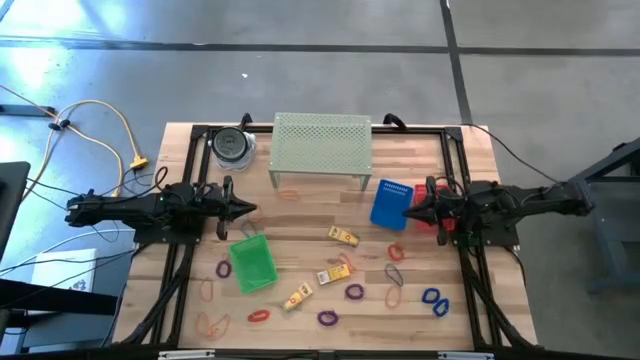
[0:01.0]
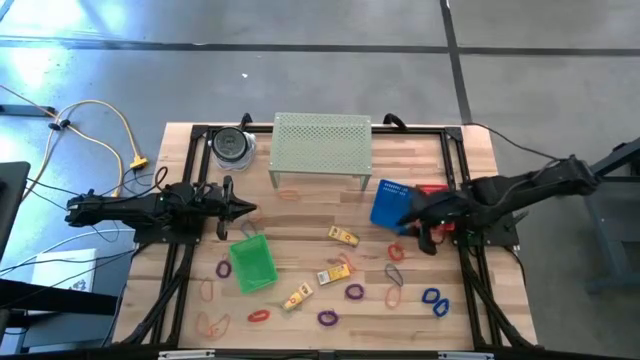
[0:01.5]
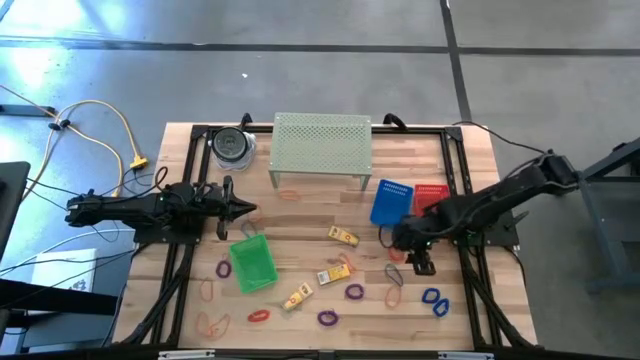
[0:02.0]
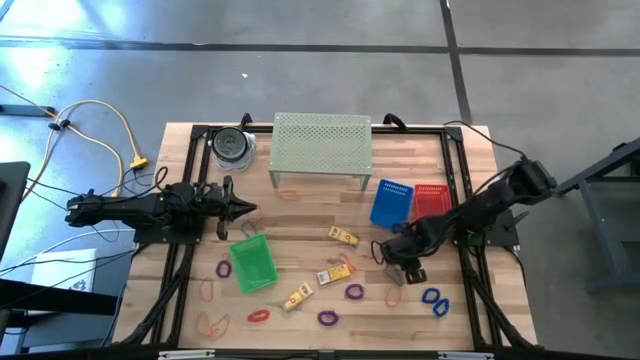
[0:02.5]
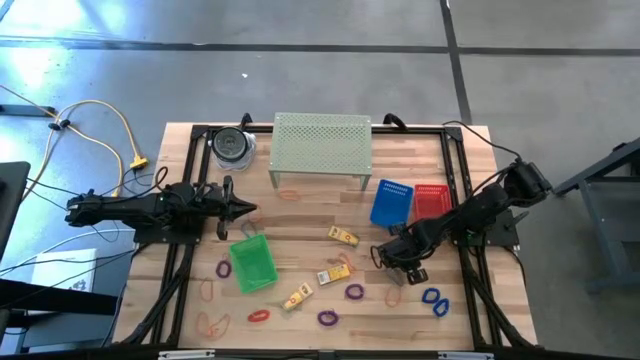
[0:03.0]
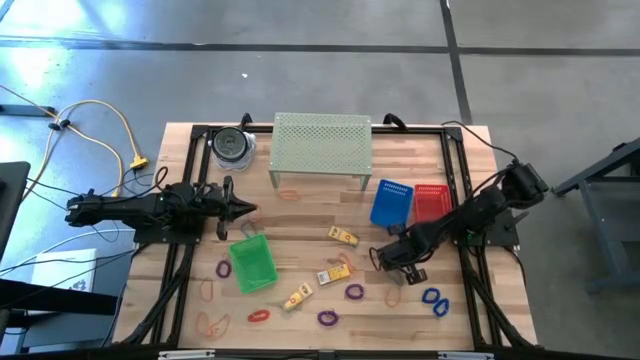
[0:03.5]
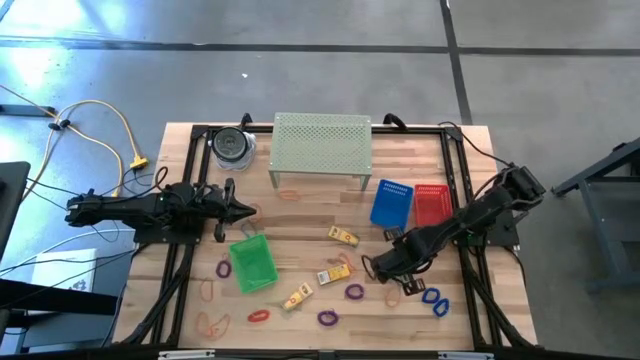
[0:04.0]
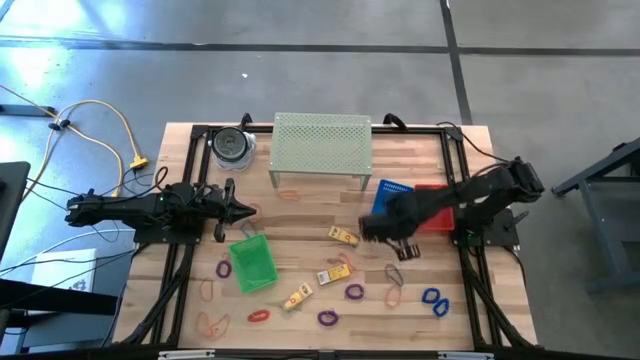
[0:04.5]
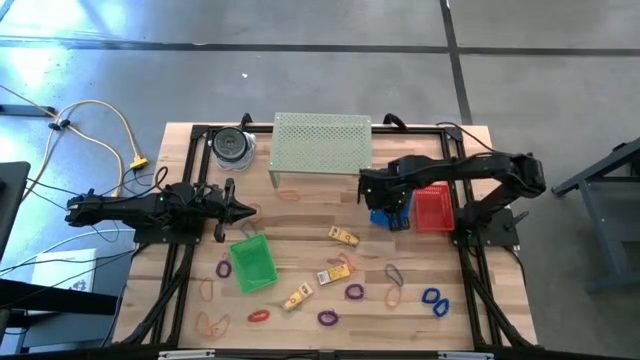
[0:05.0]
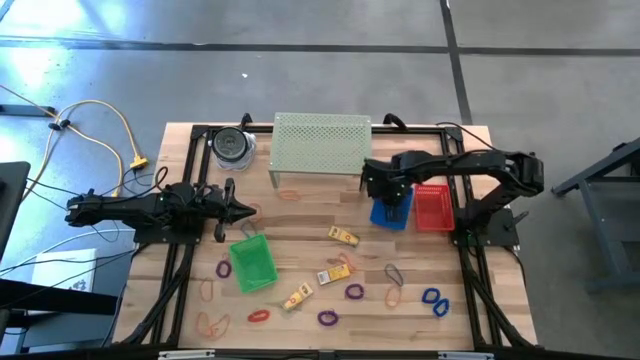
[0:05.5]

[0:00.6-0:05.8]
Task: Pick & Place Office Desk Supplies
Put the orange spring keychain into the blue bin

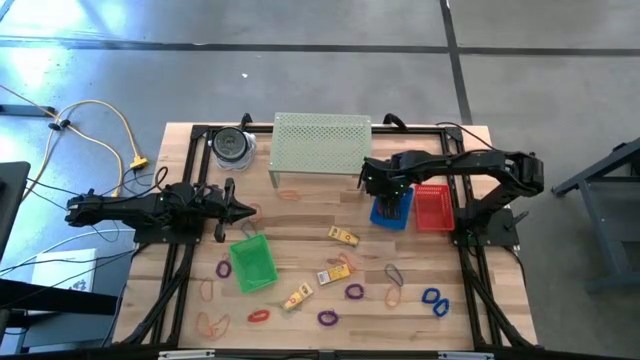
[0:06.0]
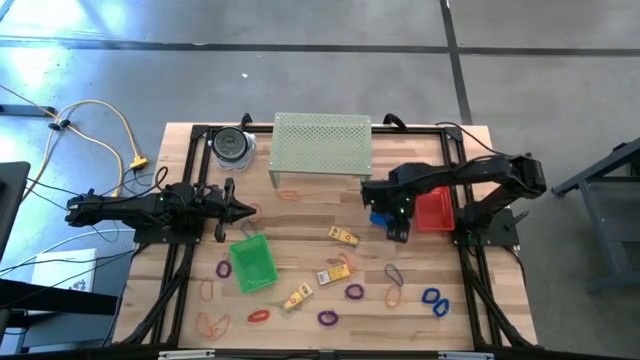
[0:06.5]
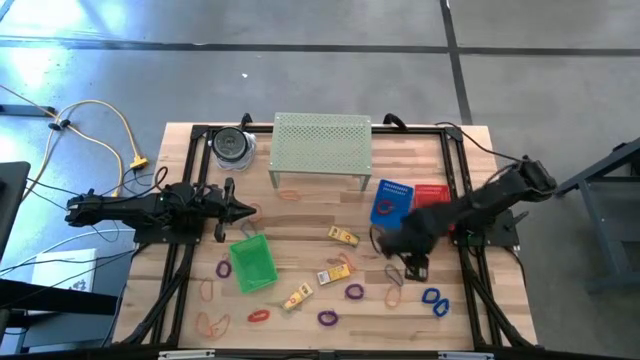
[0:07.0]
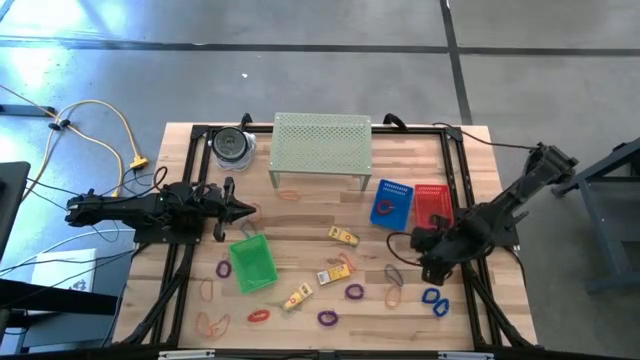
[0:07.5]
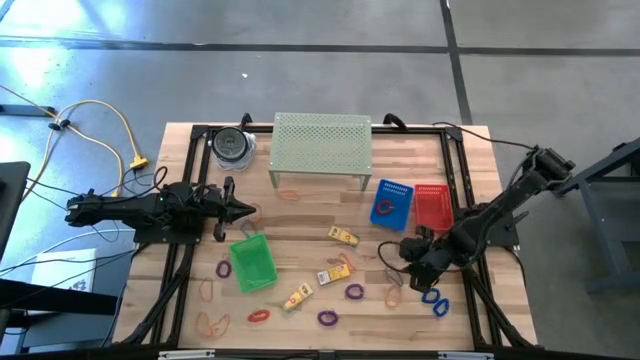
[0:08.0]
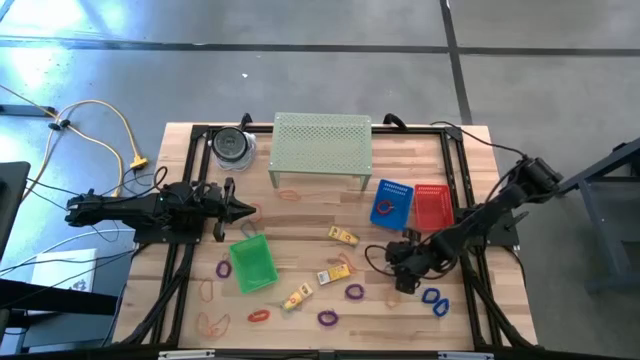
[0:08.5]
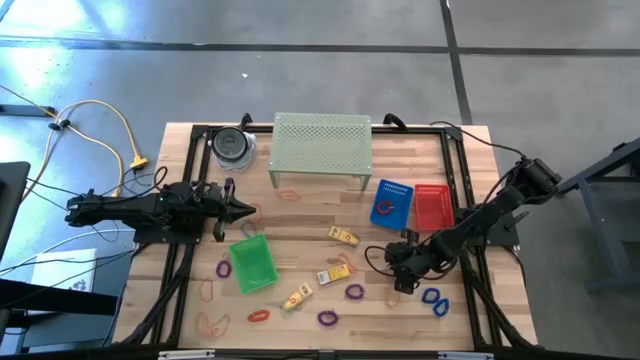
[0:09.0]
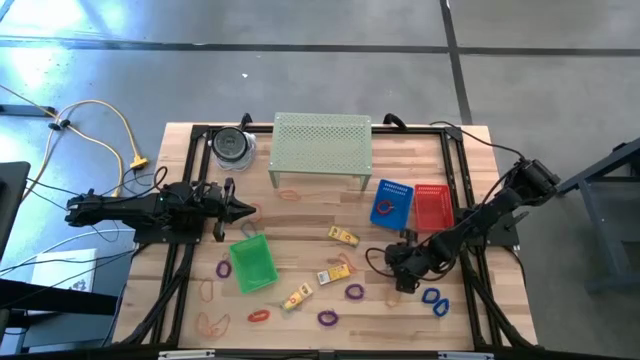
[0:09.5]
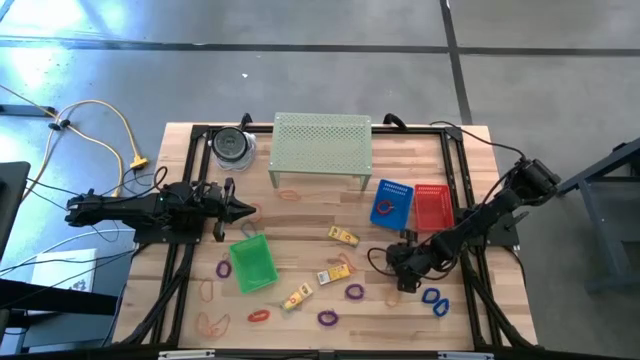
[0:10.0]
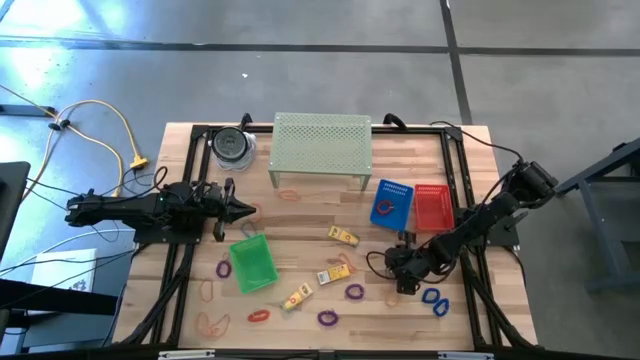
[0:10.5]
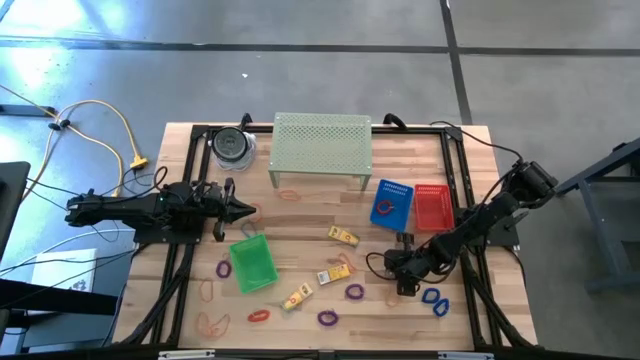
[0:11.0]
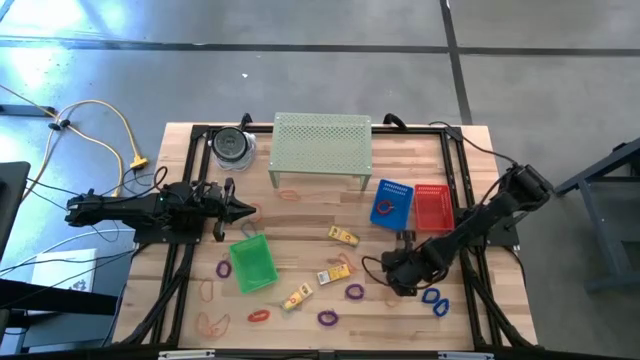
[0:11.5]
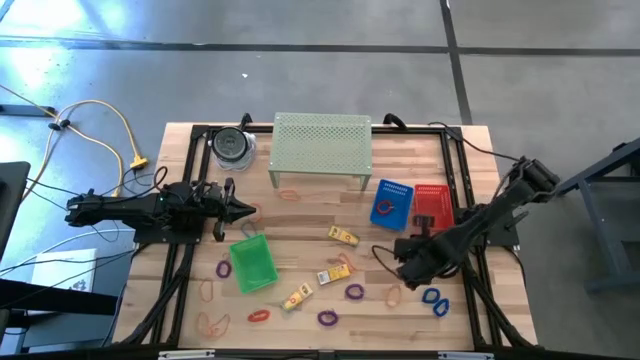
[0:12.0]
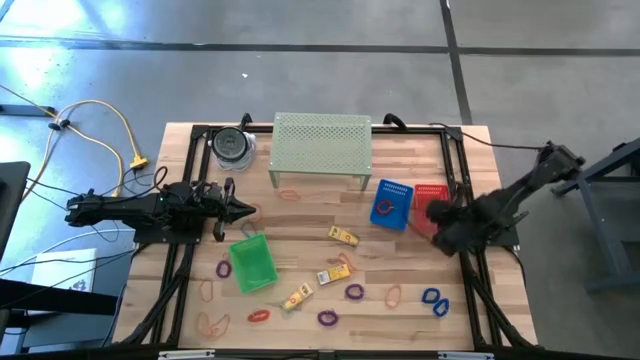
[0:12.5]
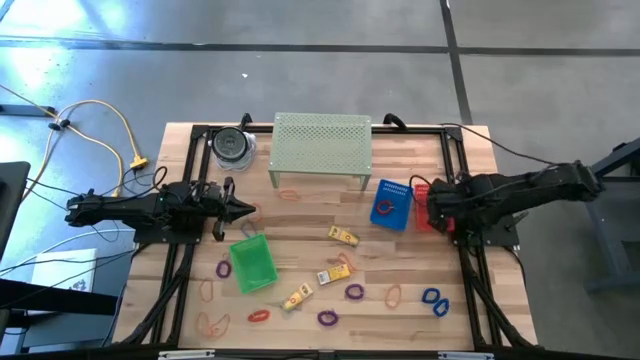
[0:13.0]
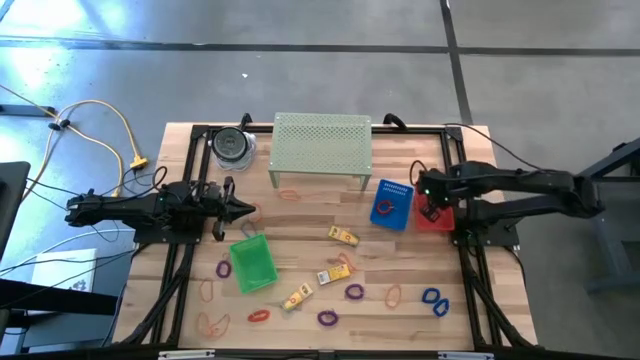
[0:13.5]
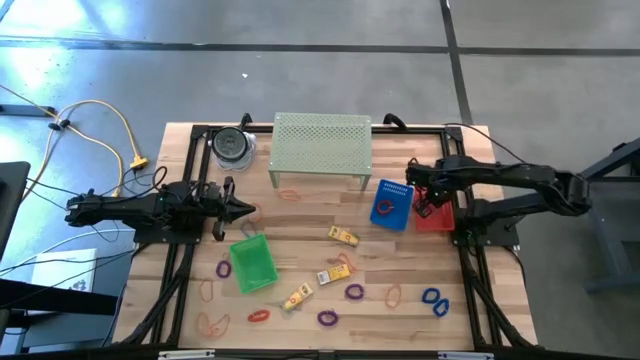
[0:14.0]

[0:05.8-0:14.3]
Put the blue rubber band into the red bin

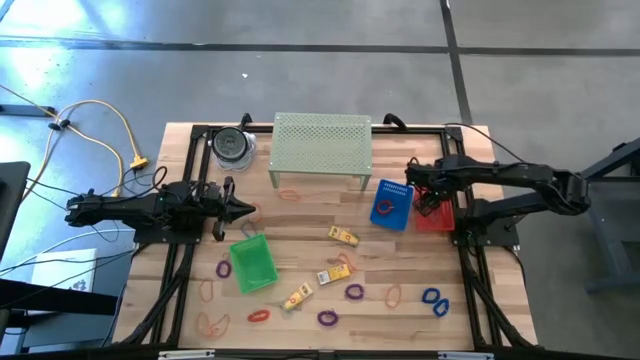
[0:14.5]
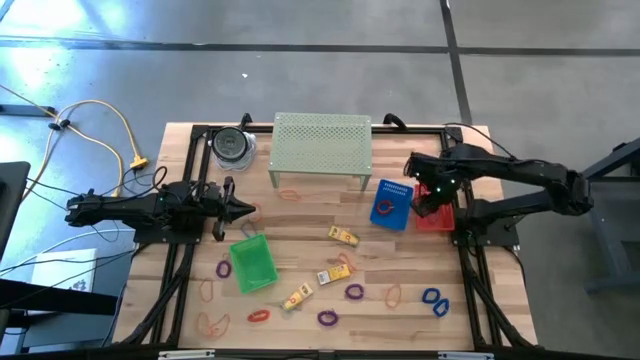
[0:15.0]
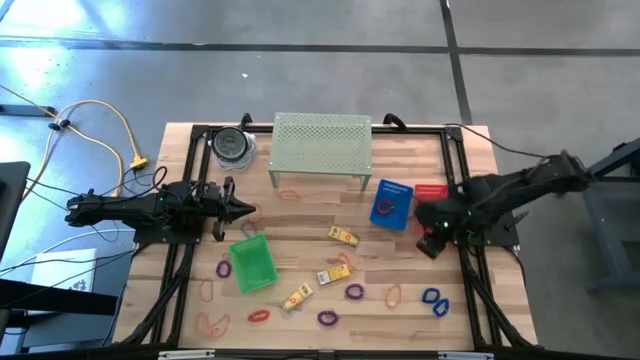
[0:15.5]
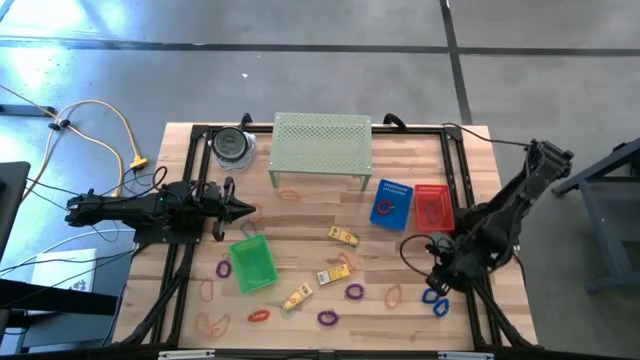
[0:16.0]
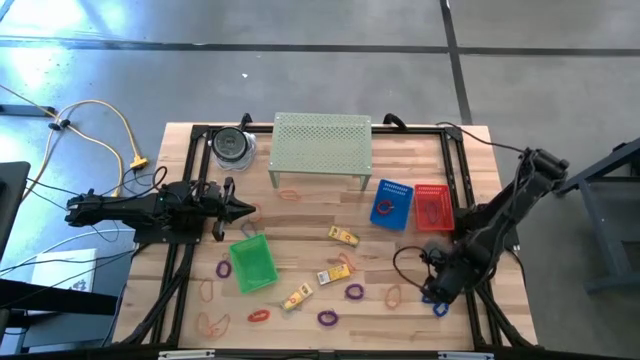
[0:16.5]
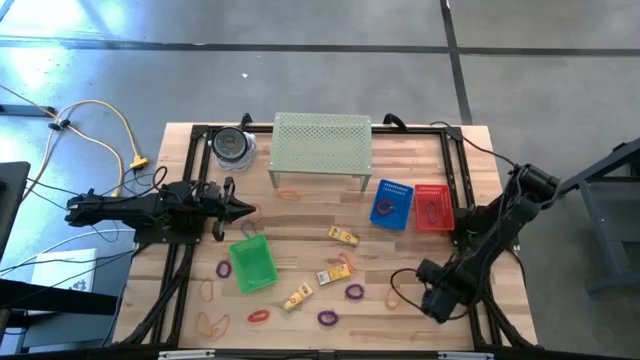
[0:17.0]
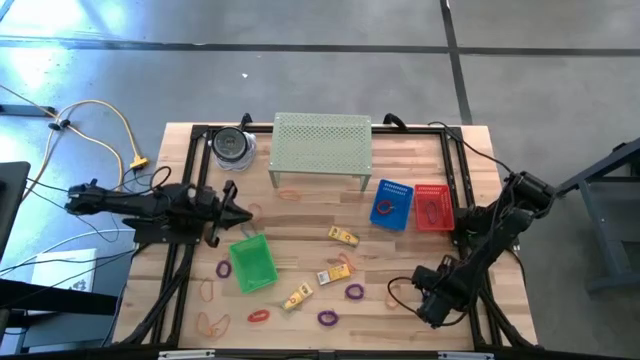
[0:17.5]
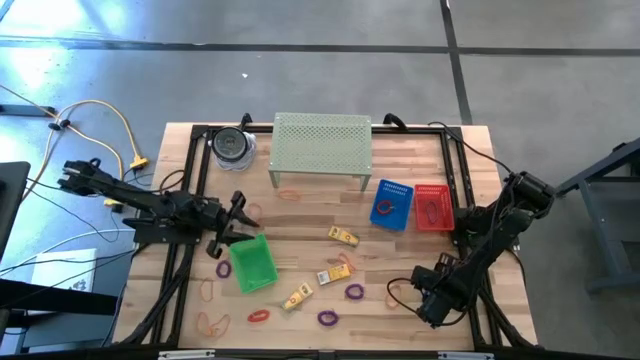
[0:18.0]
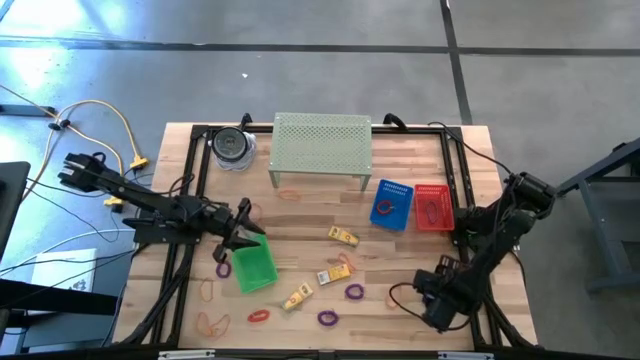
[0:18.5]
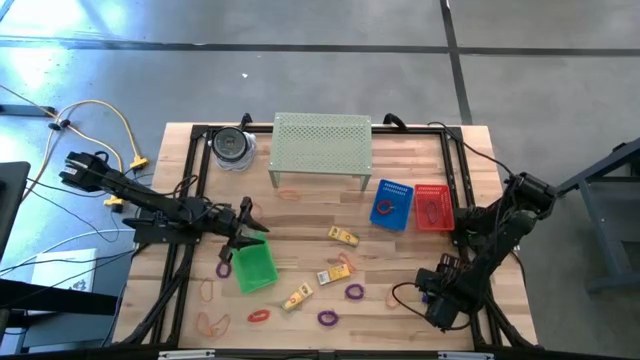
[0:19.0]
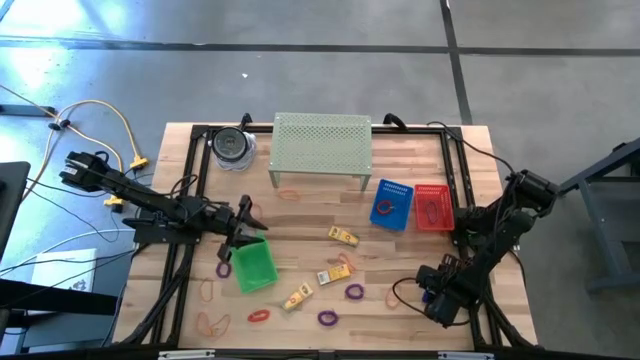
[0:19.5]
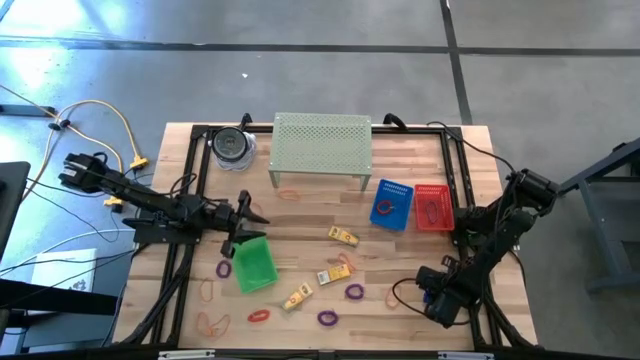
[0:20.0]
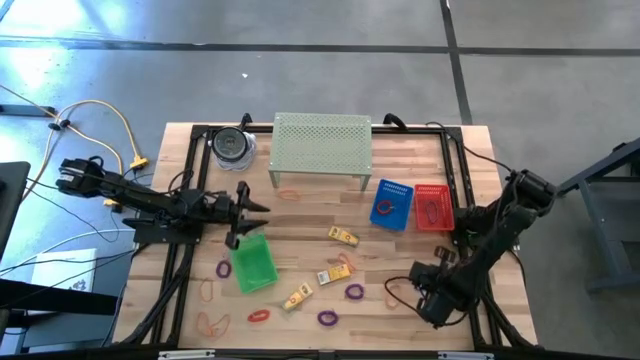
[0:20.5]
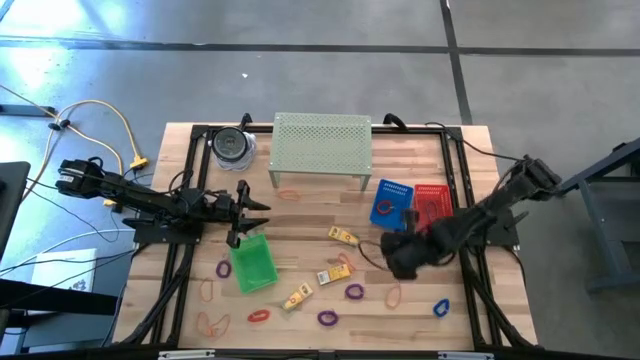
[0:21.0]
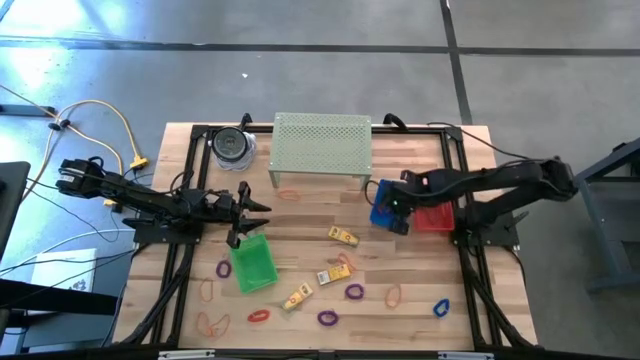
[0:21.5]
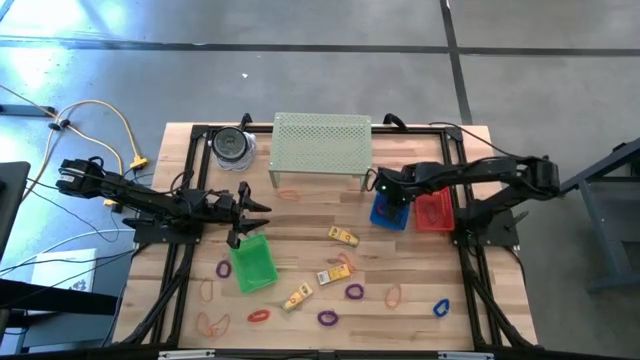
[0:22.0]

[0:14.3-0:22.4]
Put the blue spring keychain into the blue bin
